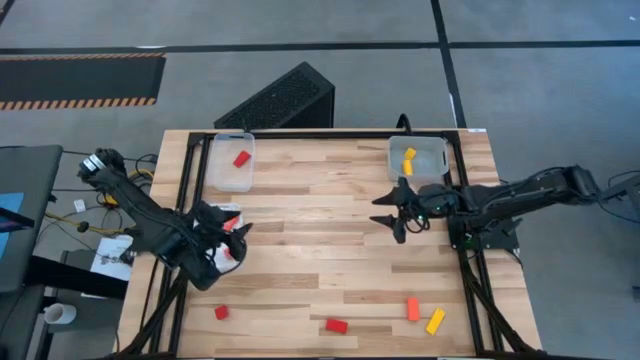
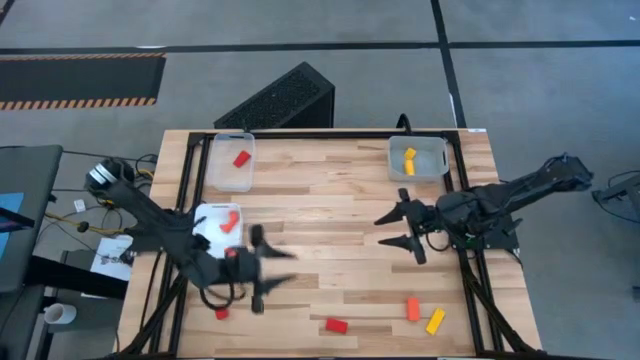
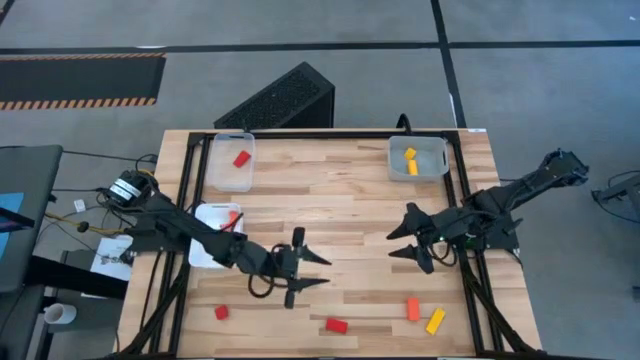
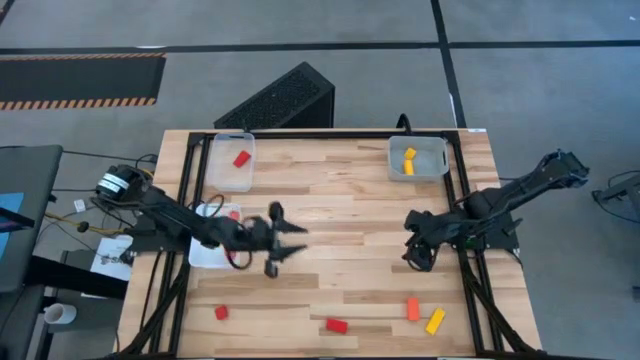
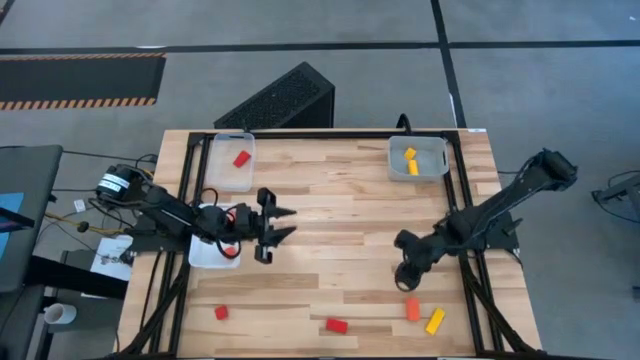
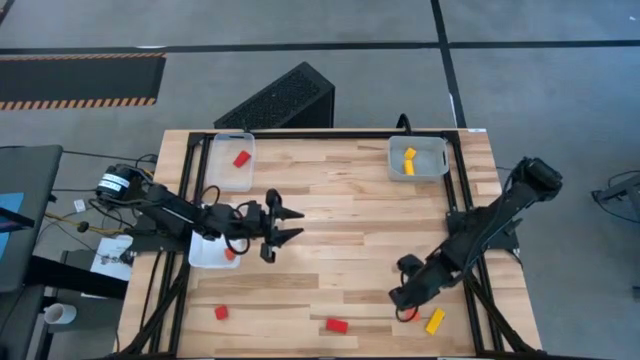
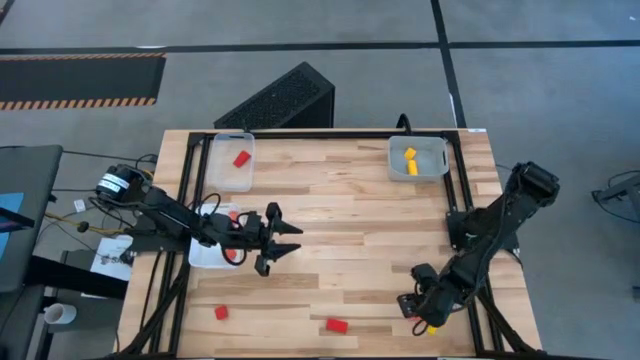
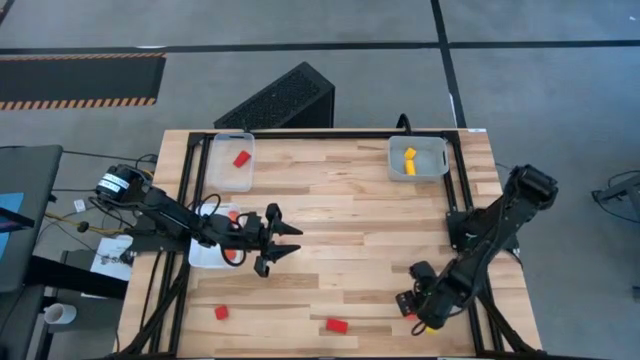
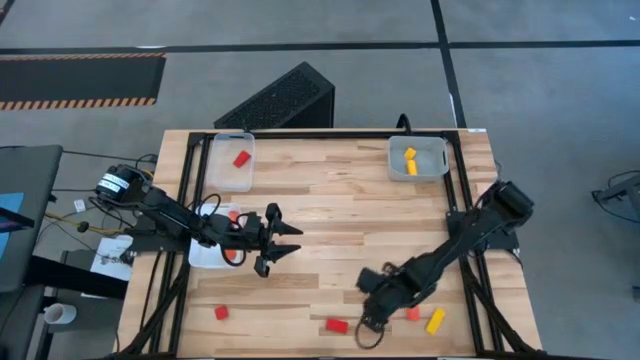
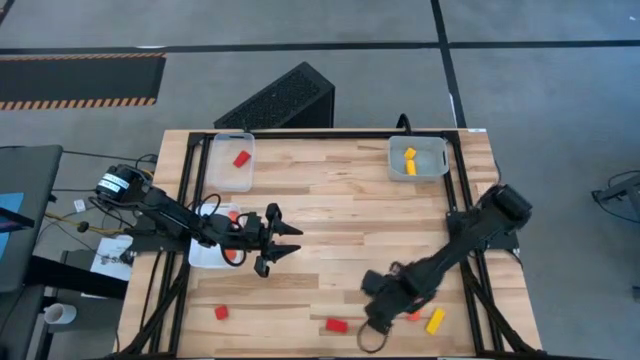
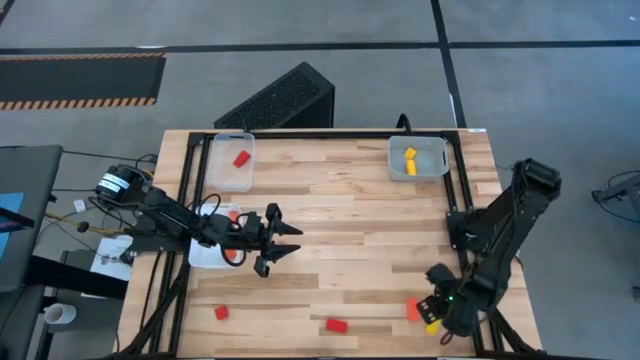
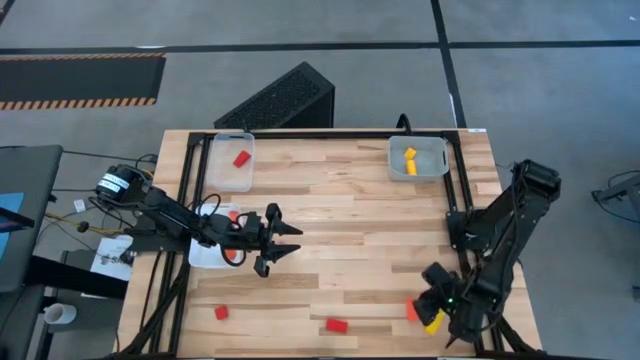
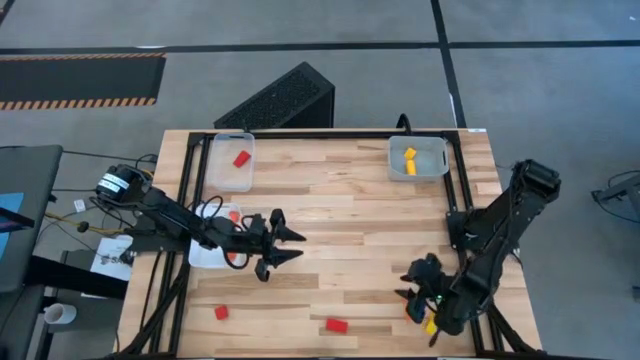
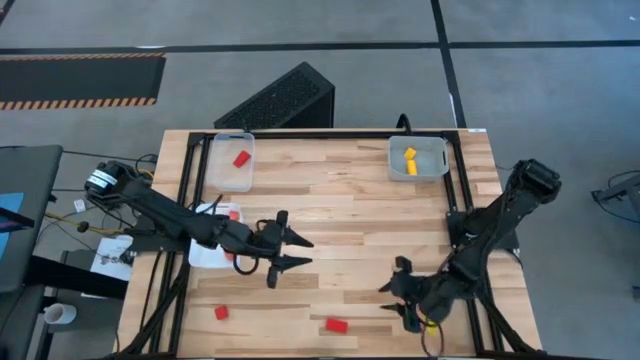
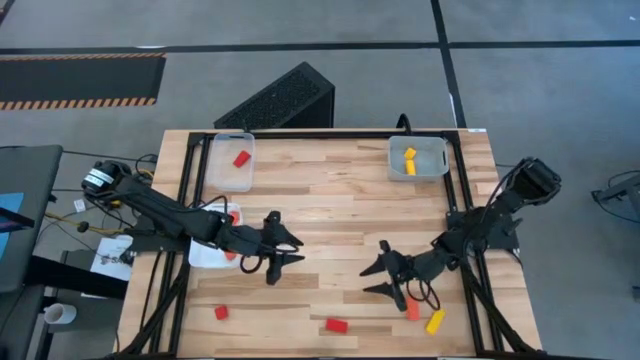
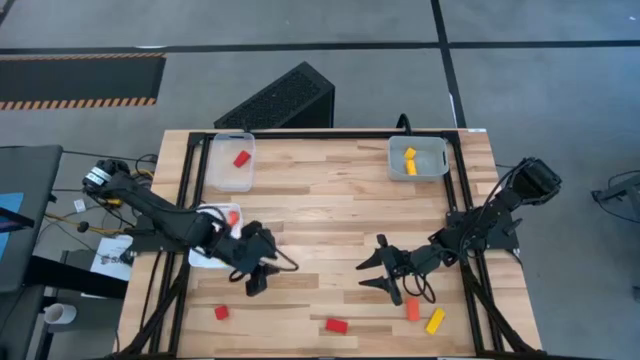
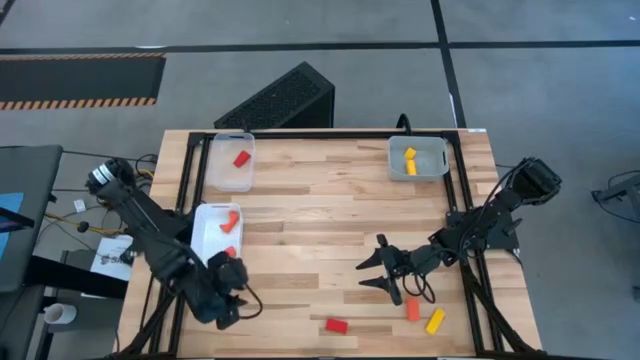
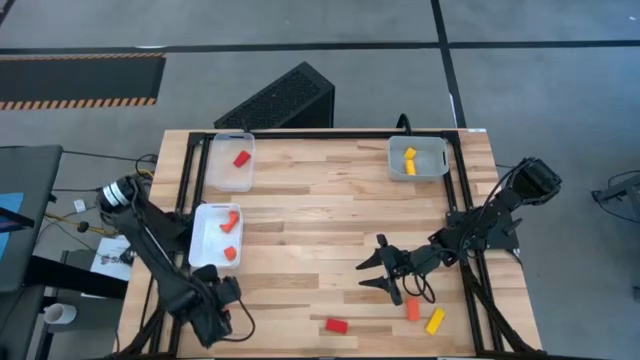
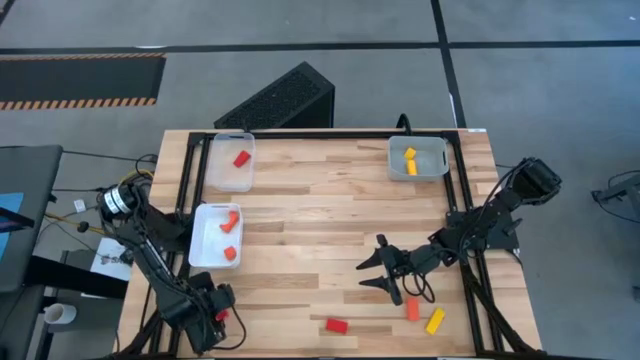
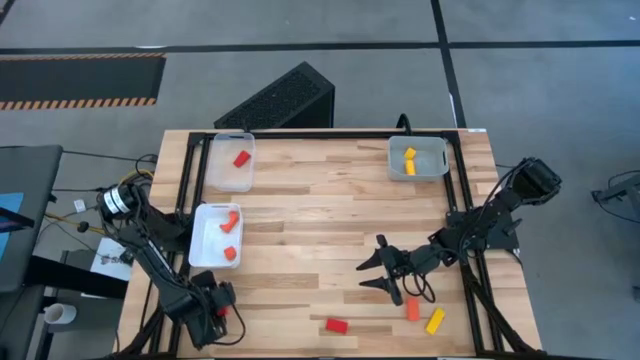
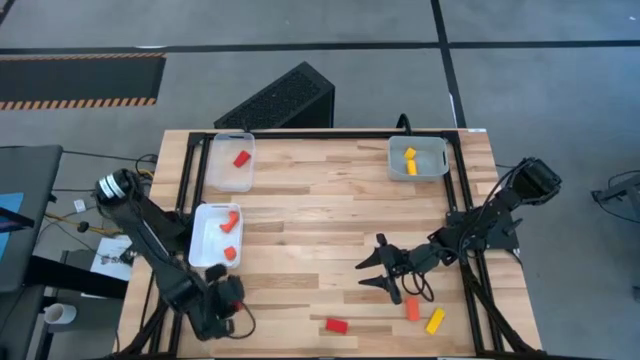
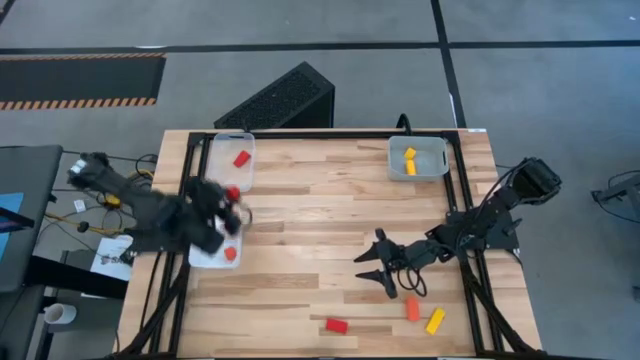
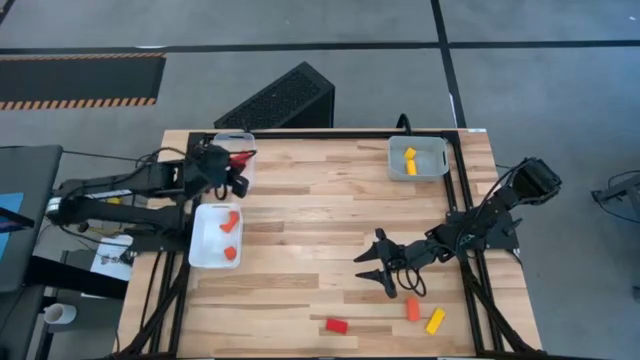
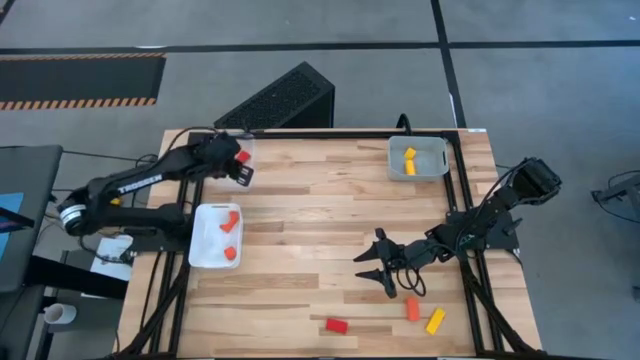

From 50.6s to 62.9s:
Task: Sort & place blocks by color
Put the left red block into the transparent bin

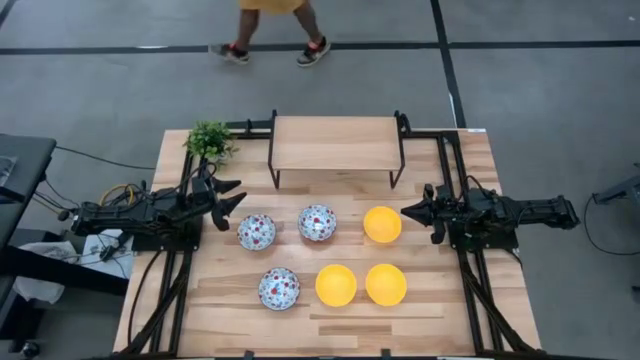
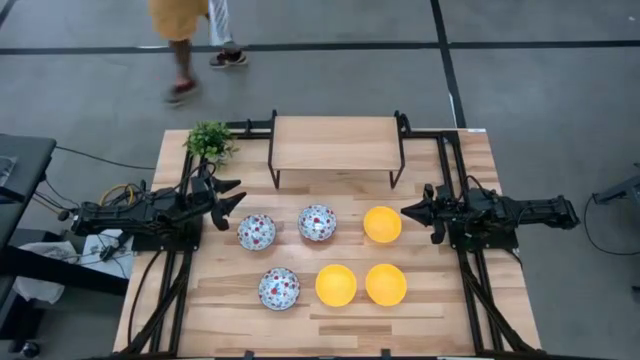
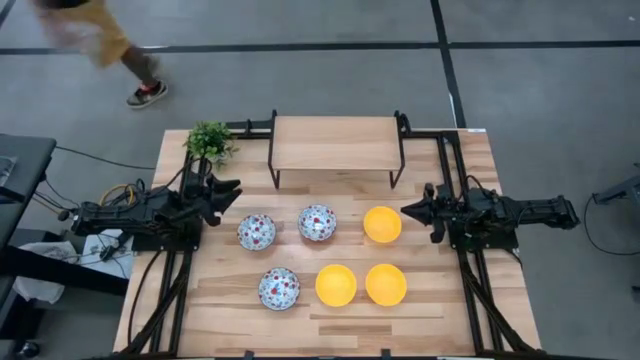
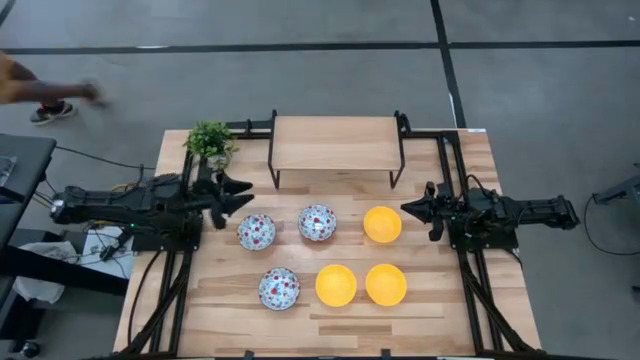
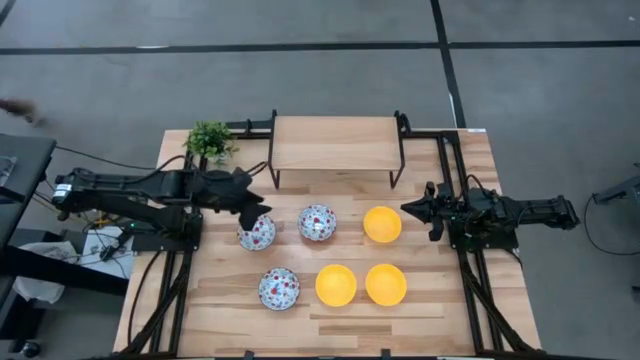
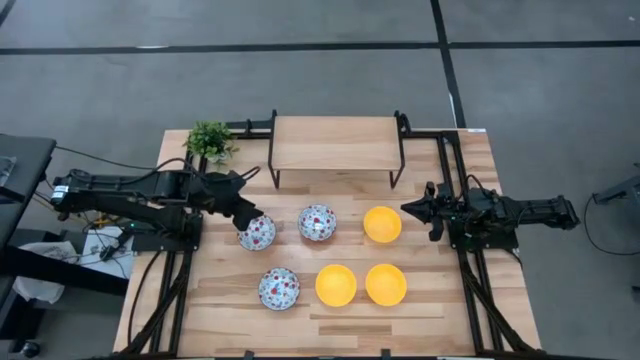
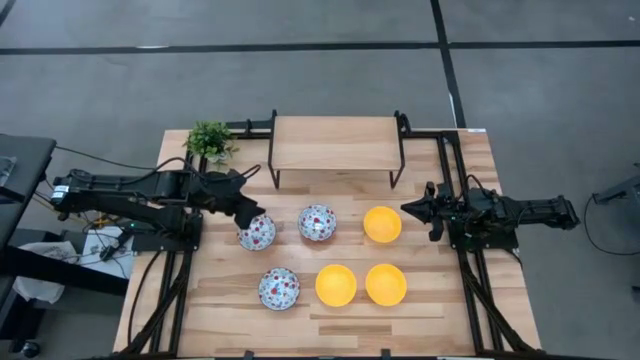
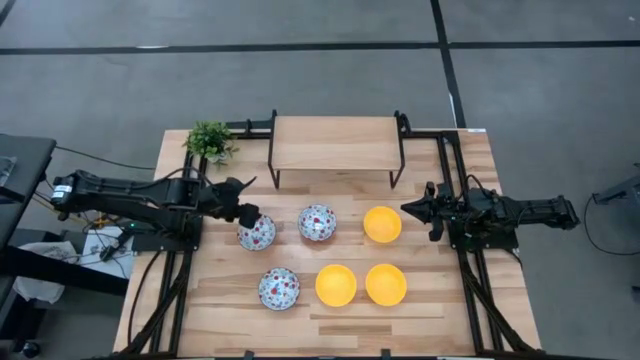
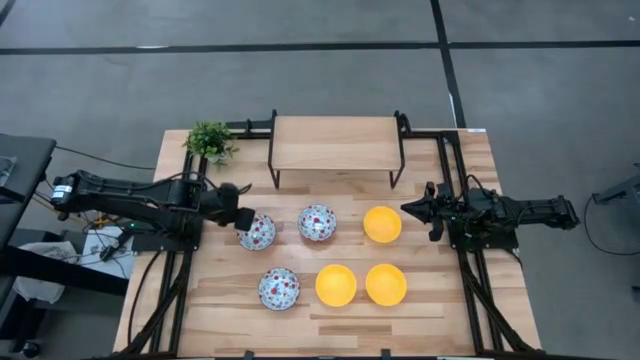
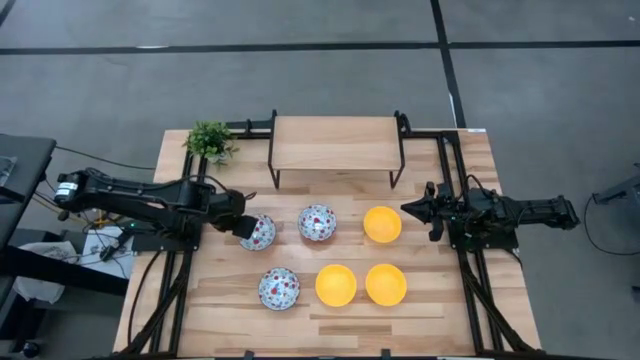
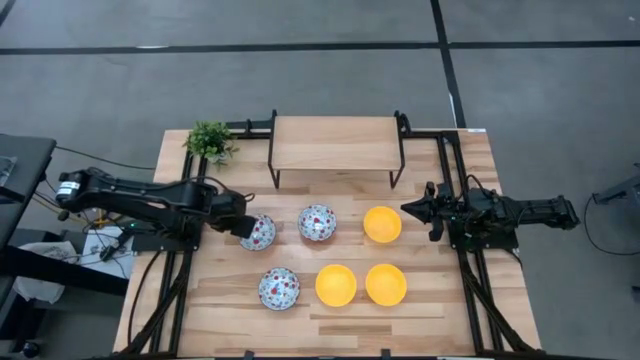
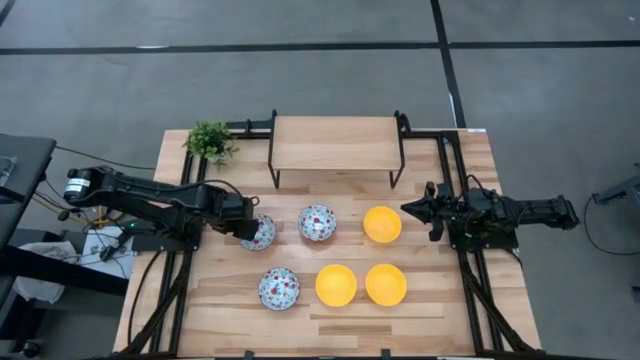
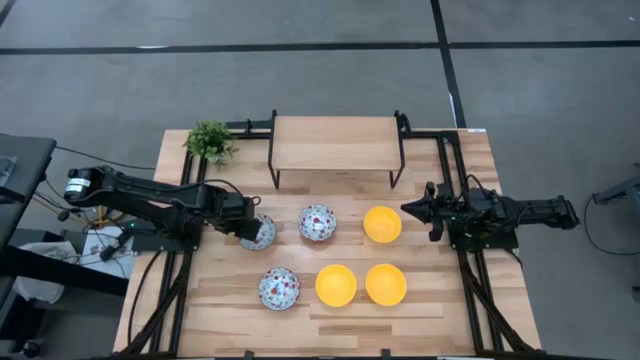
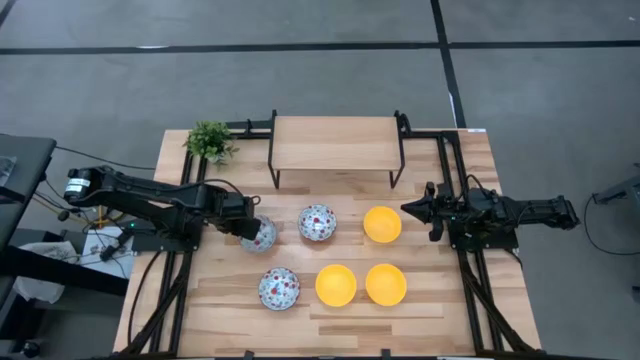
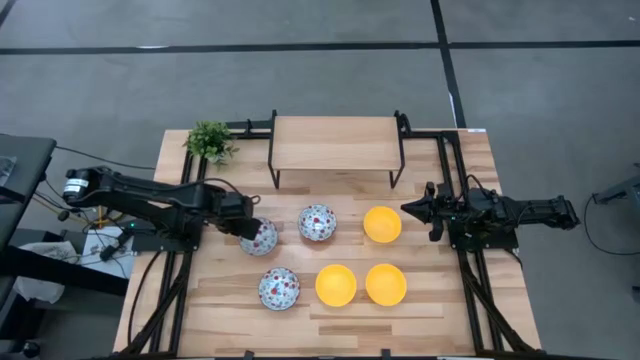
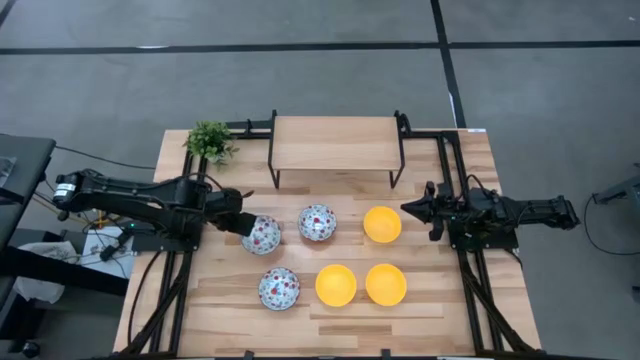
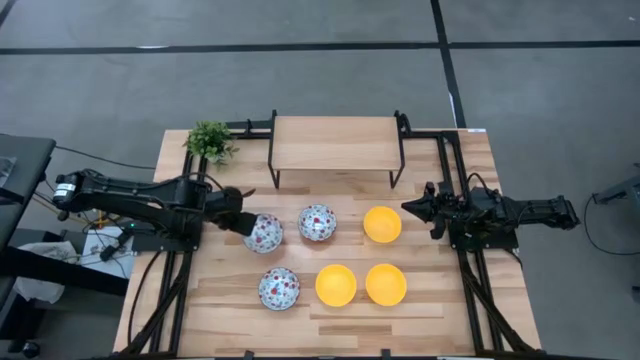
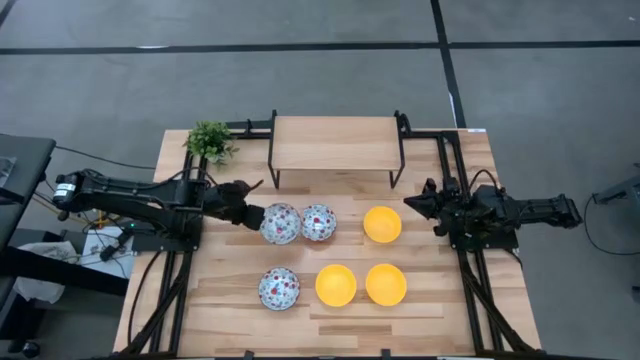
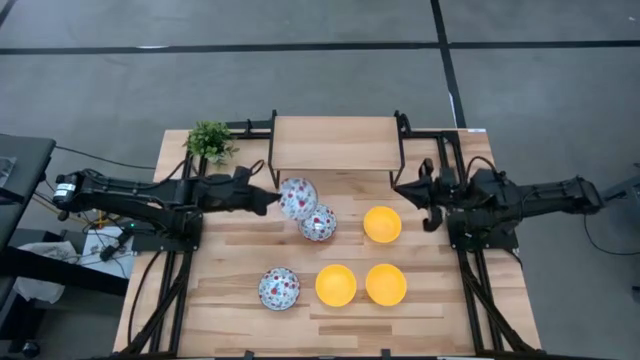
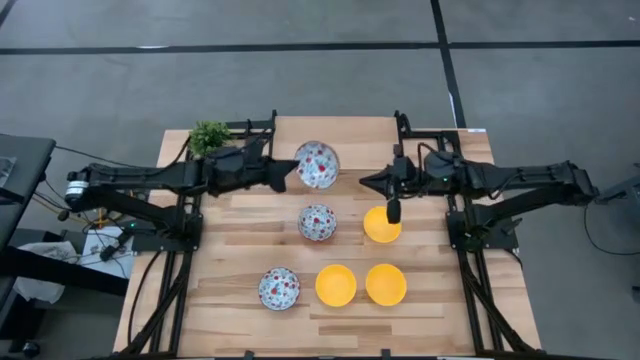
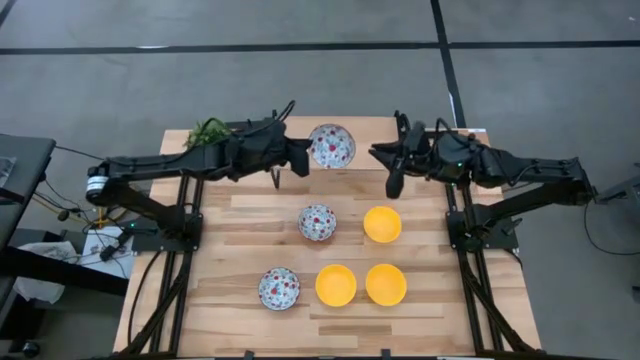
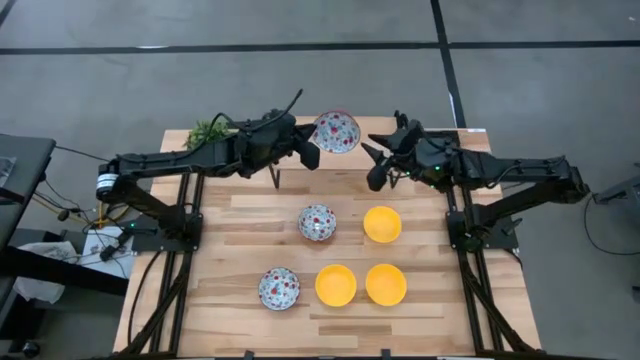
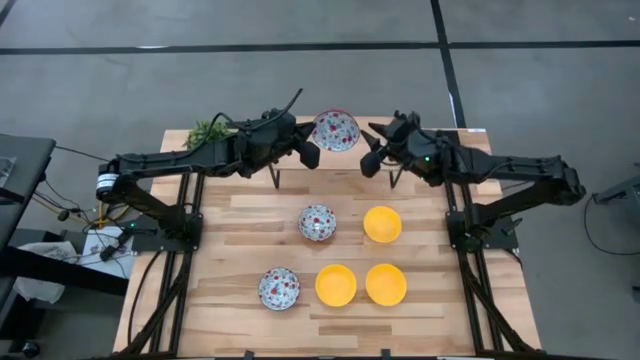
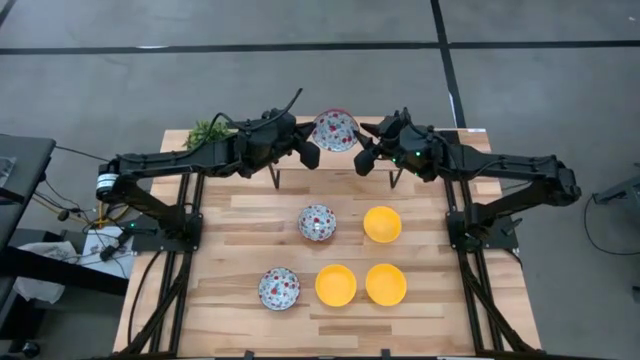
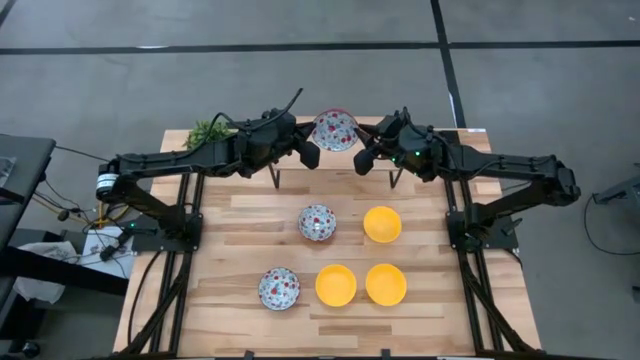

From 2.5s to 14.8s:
Task: Pick & Place Mini bowls
Put the top left white bowl on the shelf
